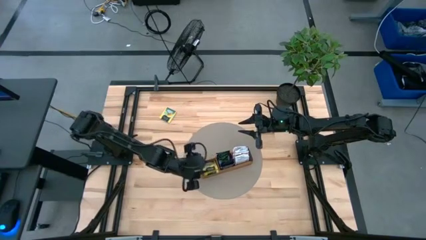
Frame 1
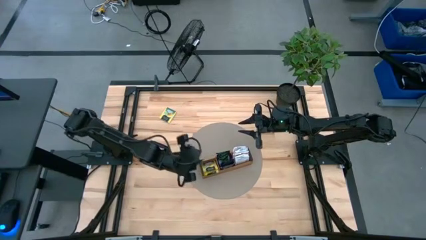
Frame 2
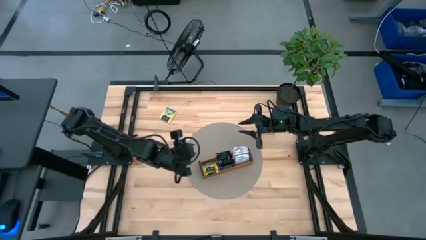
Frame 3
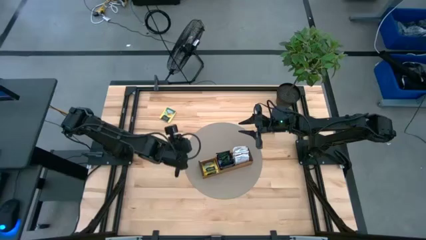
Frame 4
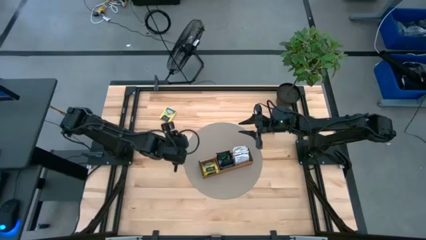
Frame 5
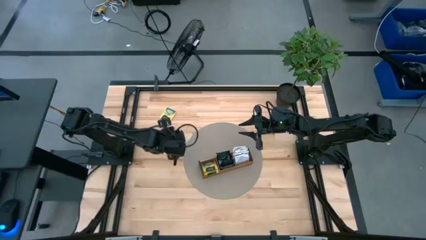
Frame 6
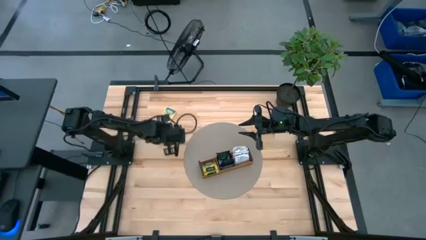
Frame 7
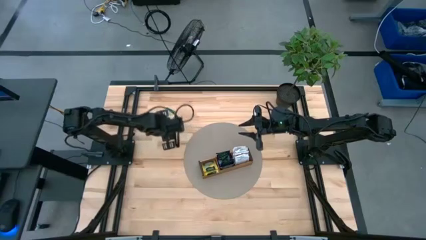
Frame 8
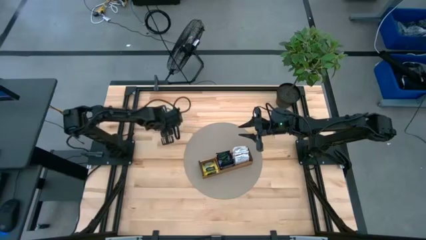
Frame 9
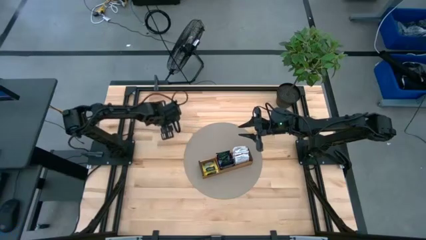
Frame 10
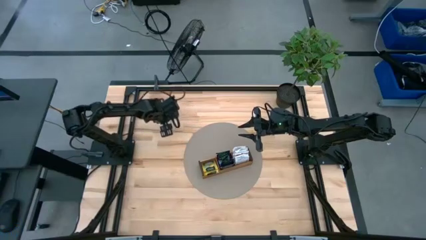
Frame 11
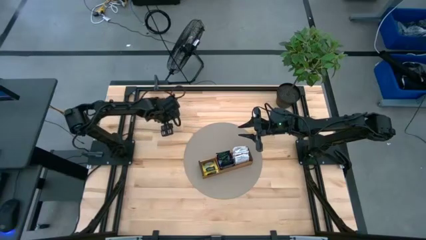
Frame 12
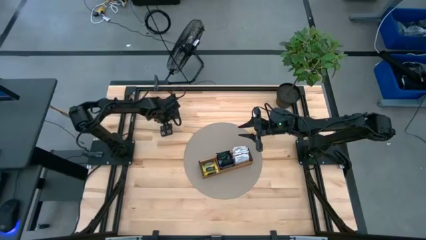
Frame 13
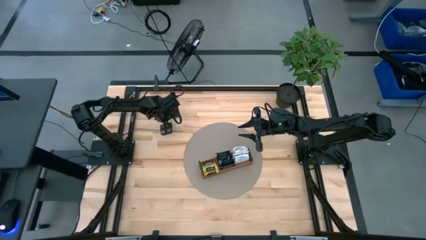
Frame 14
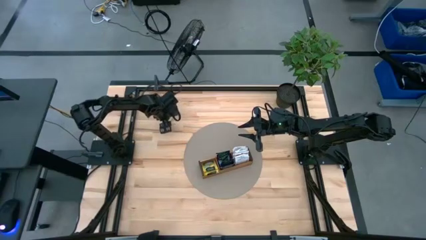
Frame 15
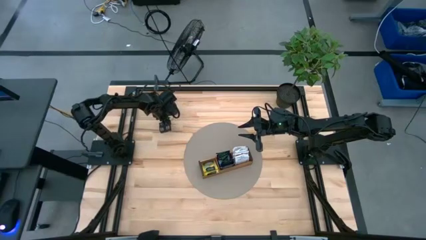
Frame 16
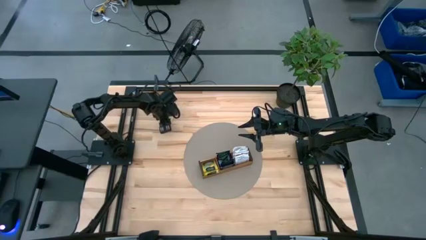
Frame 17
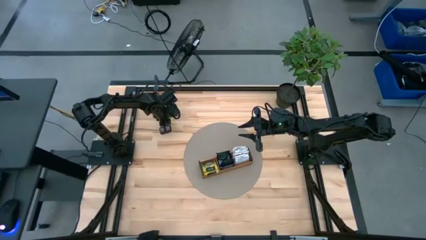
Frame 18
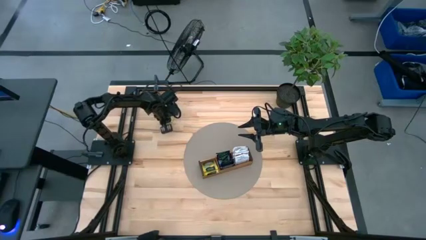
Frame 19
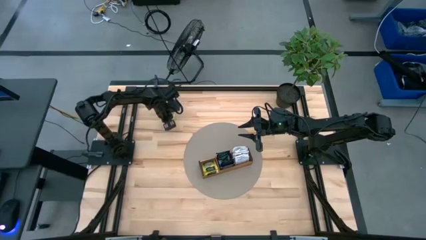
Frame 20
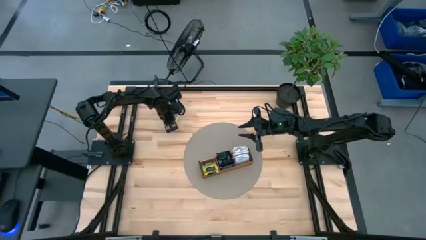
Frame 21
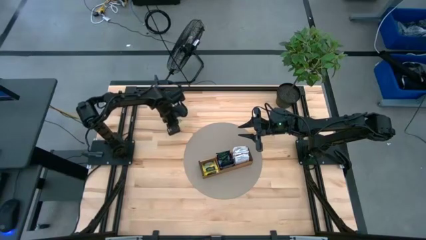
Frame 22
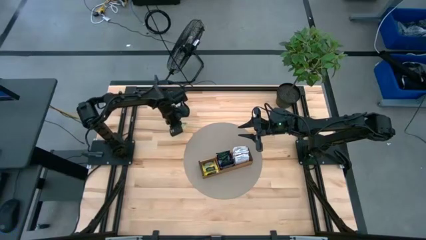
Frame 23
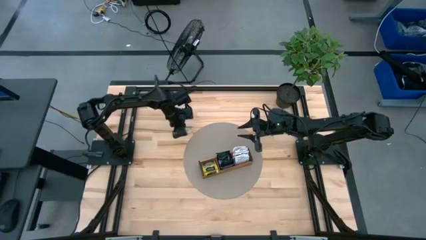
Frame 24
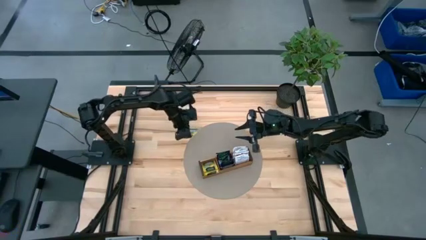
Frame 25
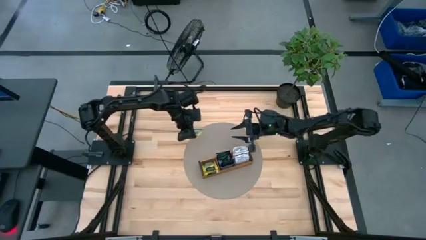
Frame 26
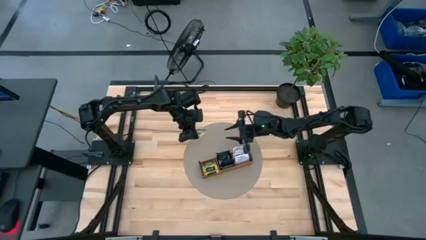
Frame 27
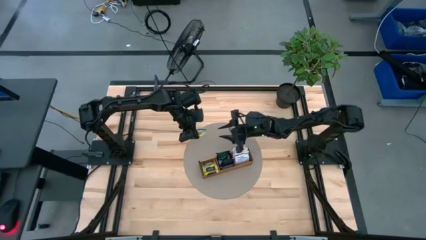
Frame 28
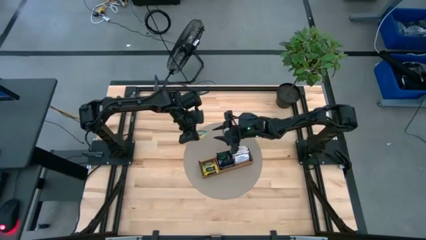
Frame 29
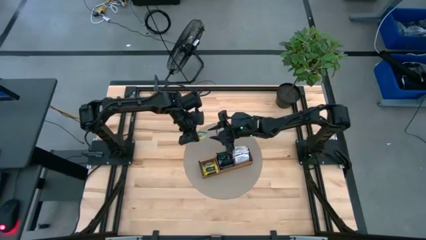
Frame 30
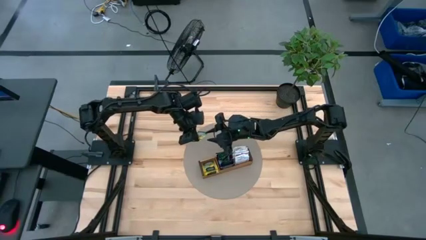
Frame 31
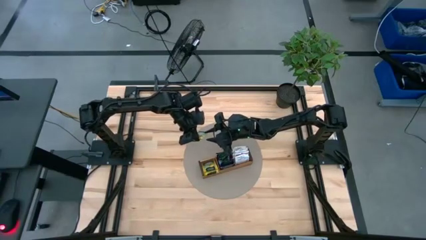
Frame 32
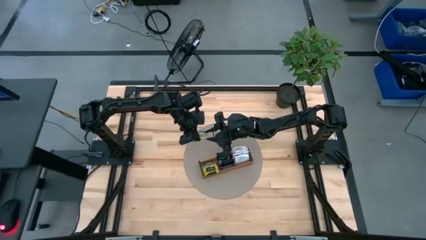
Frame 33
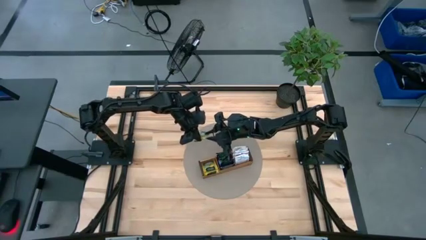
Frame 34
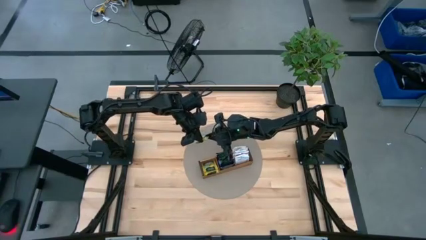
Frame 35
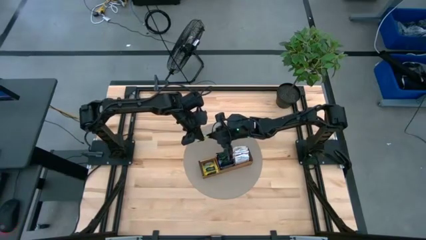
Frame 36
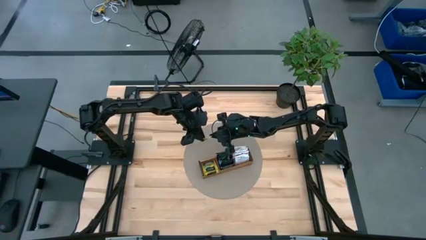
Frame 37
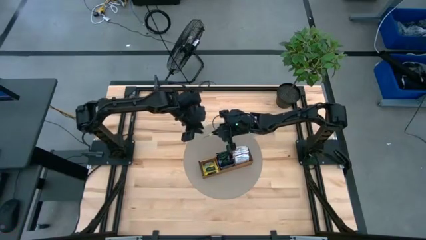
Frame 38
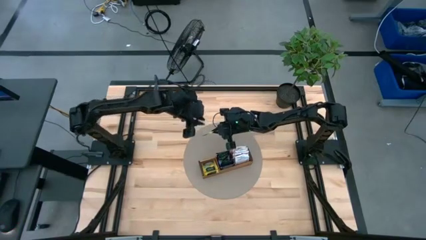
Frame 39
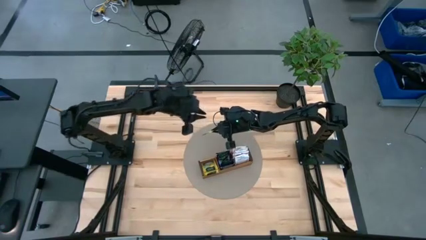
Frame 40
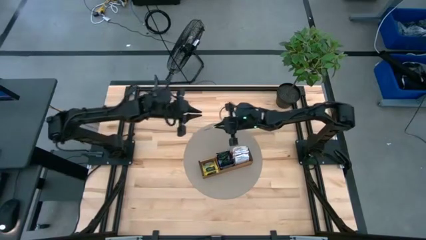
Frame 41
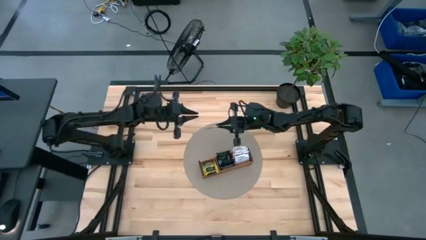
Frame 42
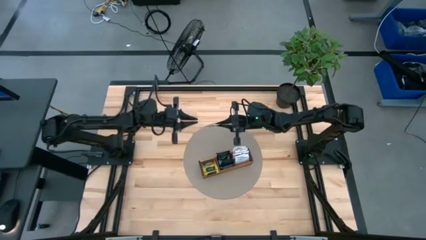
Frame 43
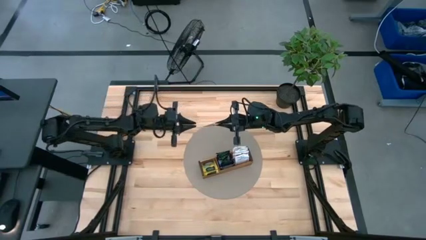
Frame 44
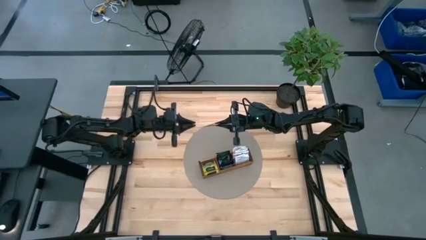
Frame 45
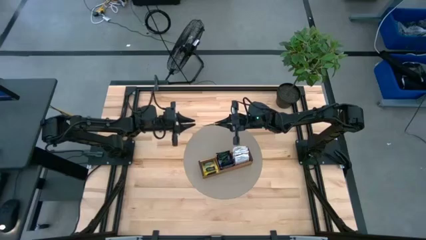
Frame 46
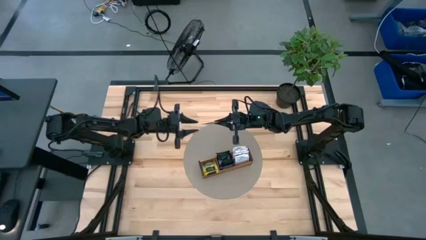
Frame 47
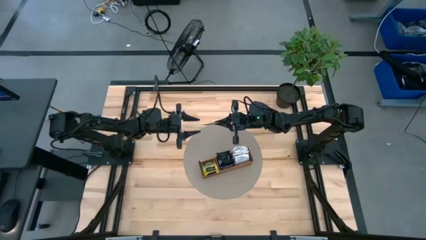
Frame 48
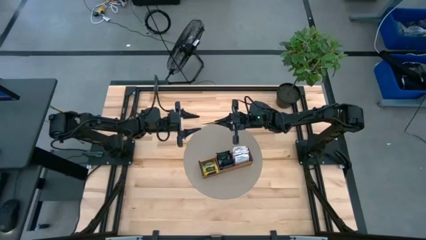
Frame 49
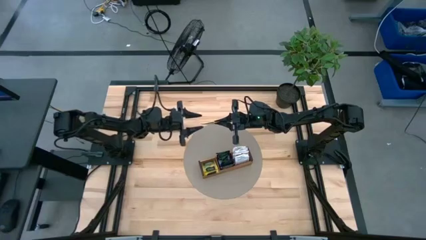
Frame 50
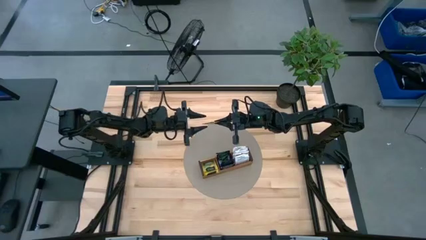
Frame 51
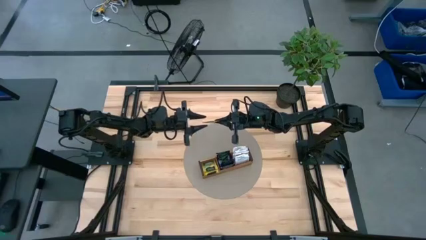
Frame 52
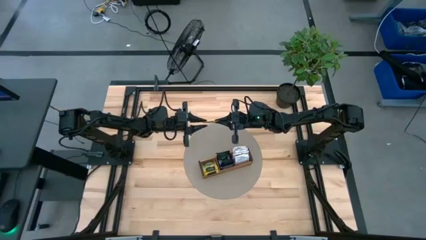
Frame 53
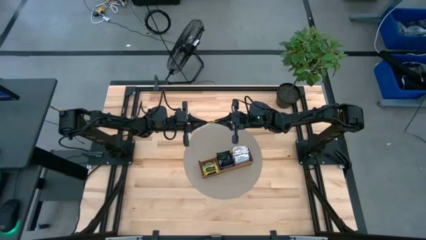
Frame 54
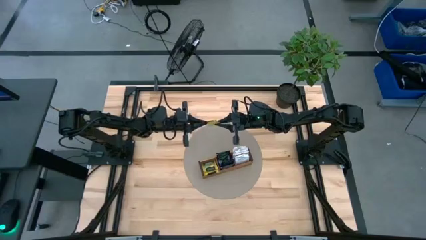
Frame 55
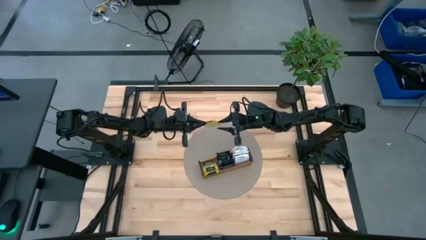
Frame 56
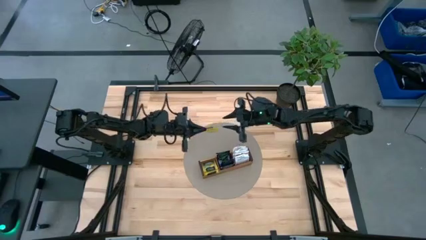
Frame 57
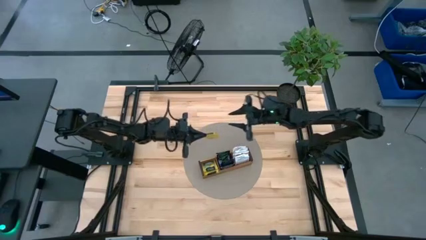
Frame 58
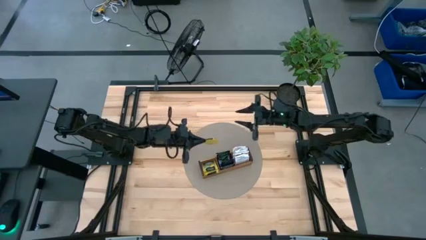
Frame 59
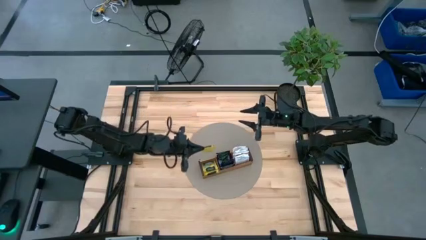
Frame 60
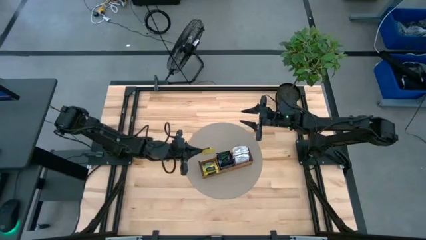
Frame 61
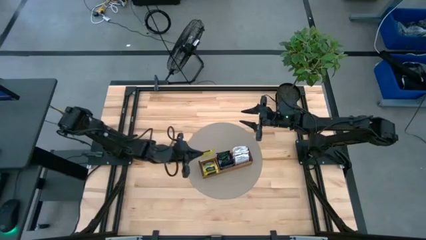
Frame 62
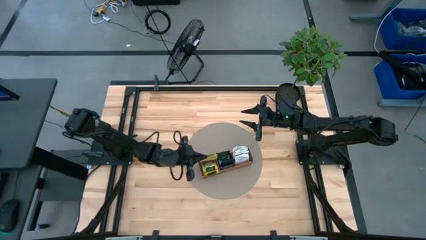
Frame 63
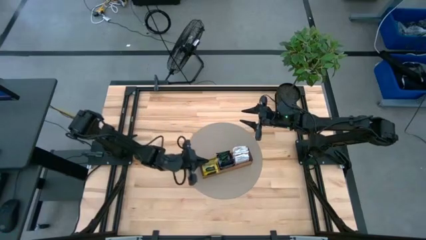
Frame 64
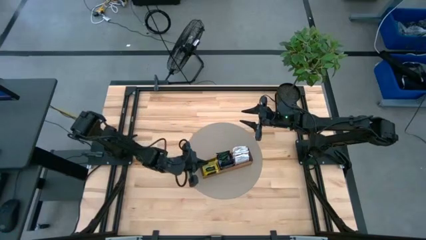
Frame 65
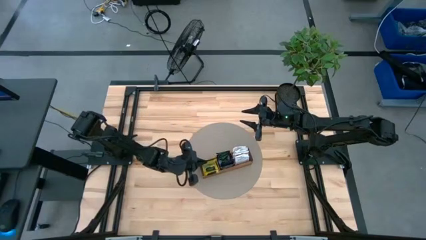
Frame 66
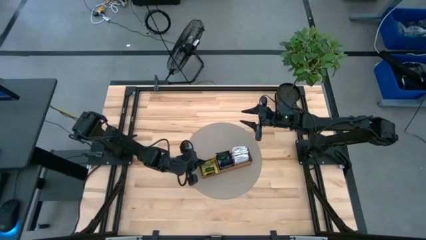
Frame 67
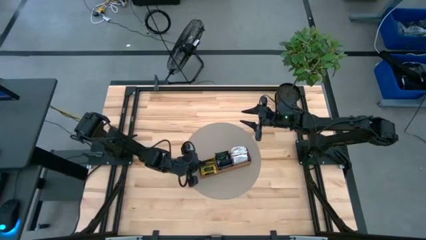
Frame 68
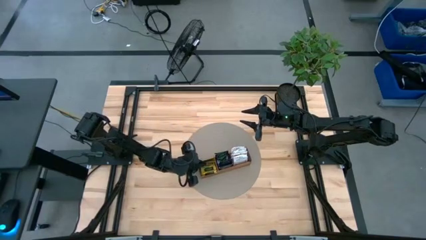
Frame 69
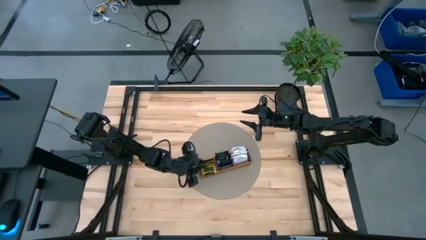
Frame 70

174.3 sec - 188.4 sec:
Task: Pick & Place Tea
Put the yellow tea bag into the left section of the wooden organizer

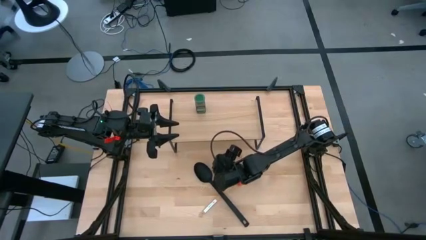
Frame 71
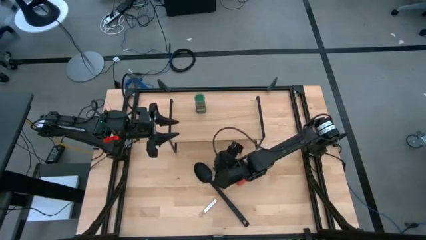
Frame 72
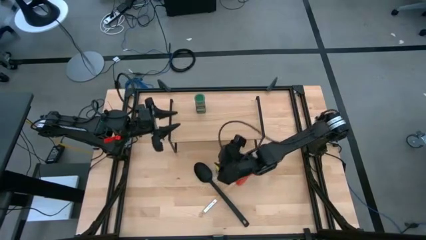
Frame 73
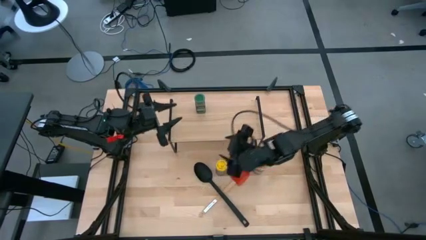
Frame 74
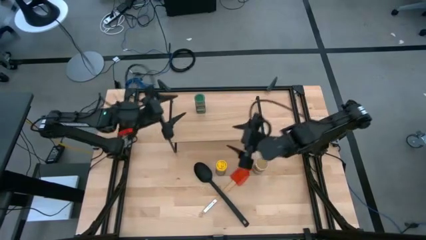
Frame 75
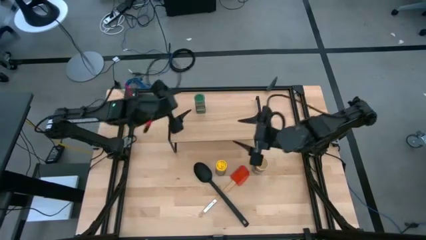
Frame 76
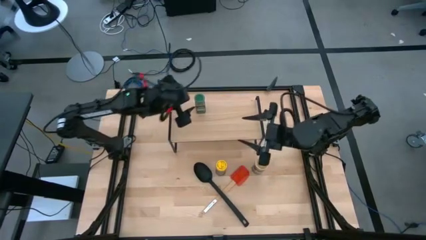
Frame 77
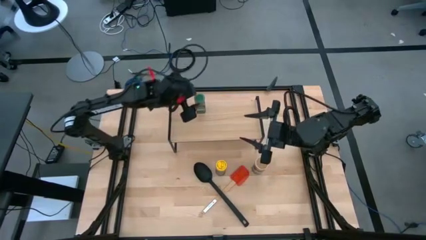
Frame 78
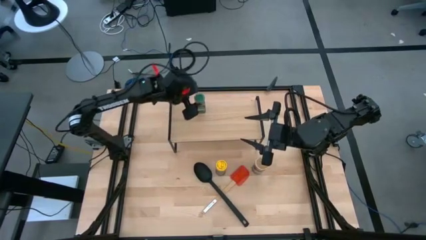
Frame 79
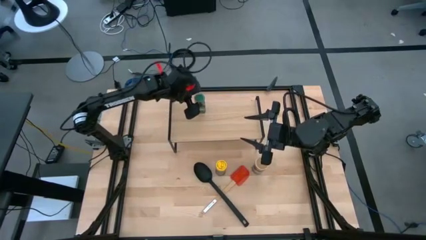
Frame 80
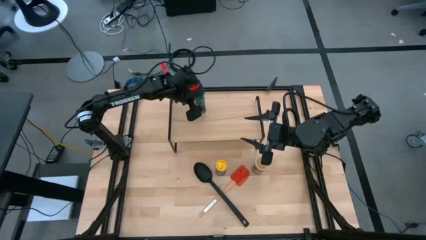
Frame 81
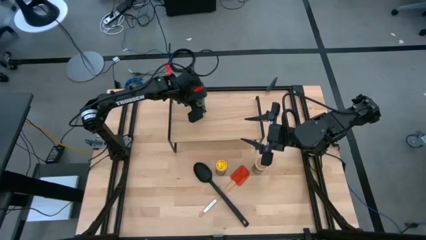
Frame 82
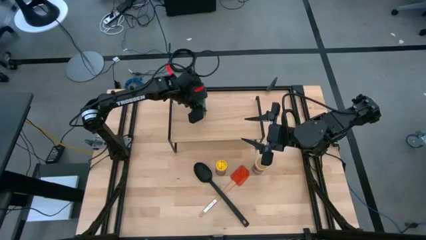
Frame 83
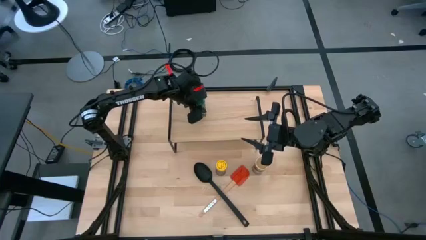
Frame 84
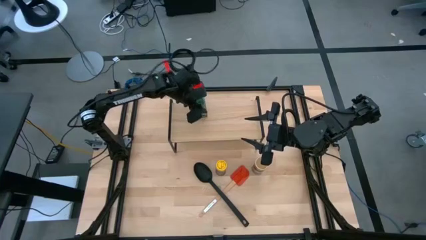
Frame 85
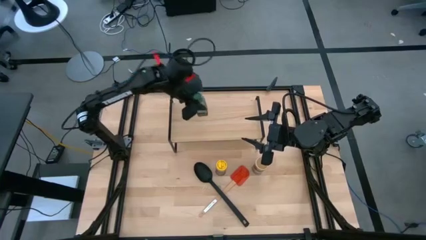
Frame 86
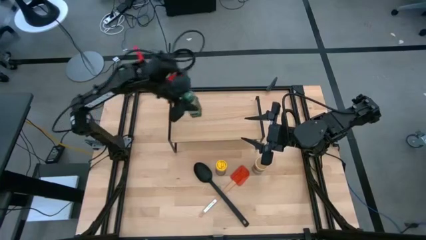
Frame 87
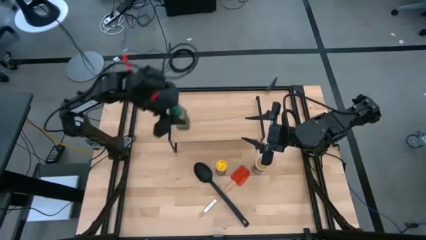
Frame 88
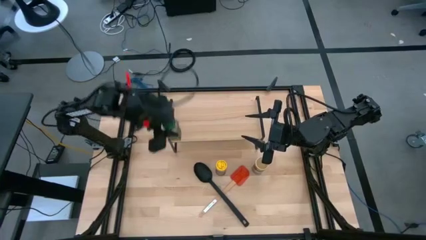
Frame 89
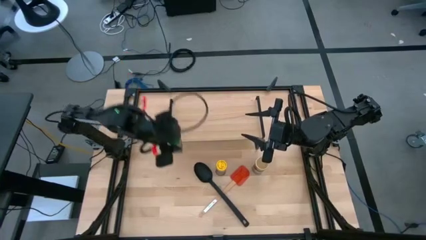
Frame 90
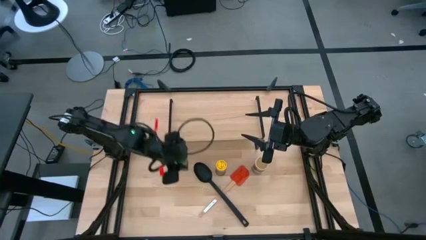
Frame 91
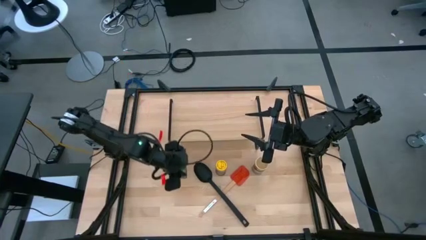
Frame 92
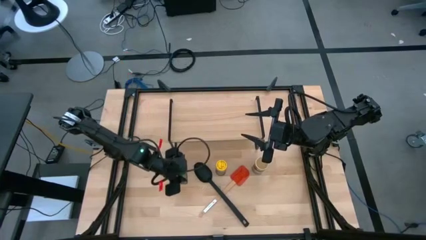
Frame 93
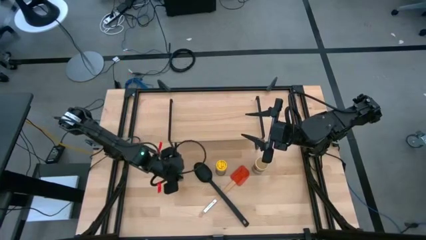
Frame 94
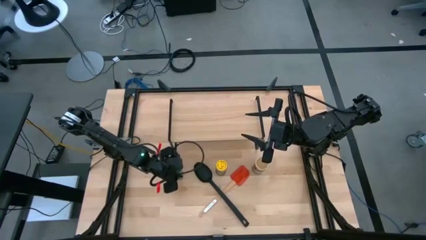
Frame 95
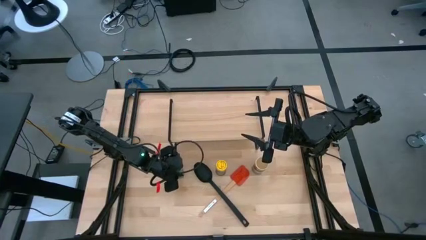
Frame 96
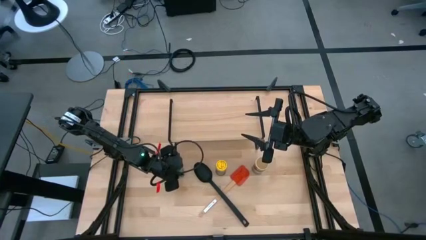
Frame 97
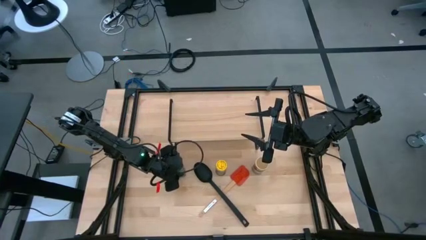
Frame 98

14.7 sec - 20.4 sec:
Task: Shelf spices
Remove the green seasoning bottle from the shelf
